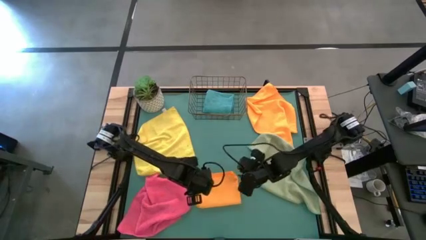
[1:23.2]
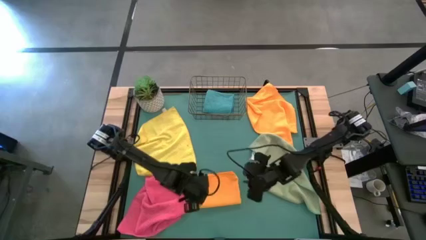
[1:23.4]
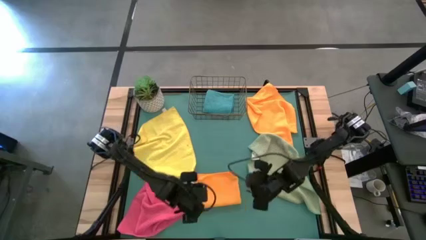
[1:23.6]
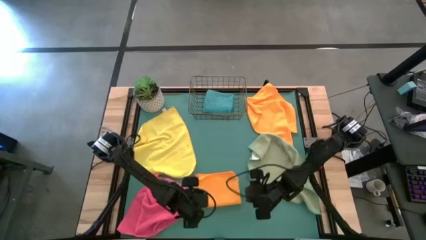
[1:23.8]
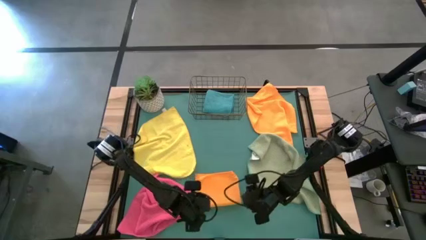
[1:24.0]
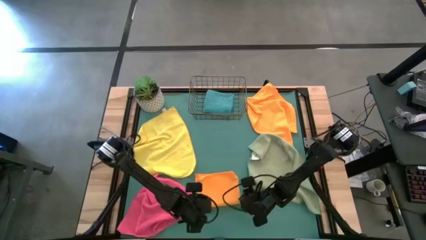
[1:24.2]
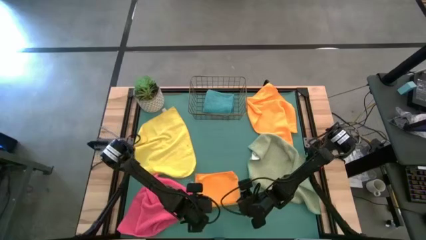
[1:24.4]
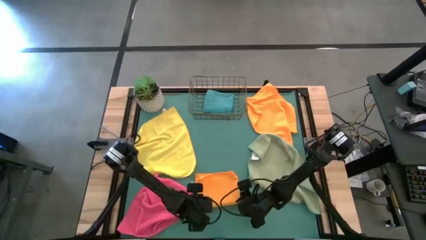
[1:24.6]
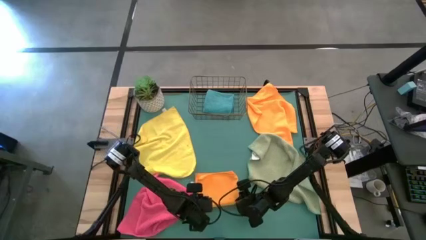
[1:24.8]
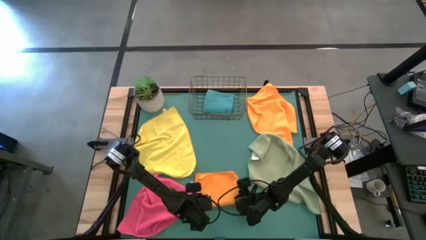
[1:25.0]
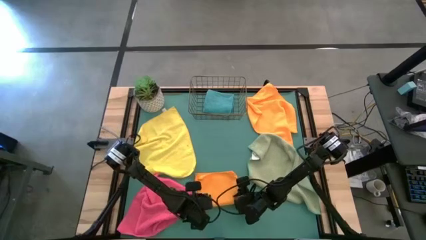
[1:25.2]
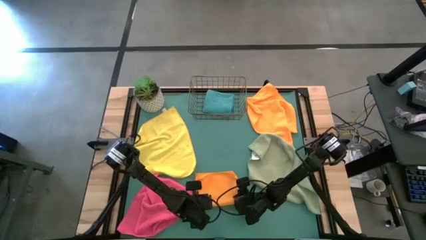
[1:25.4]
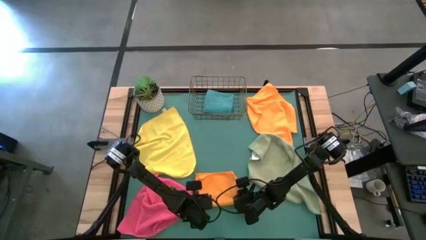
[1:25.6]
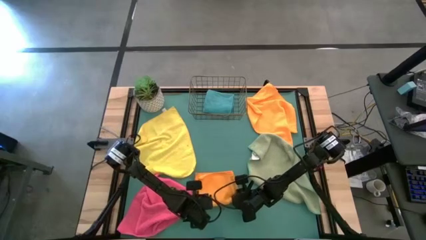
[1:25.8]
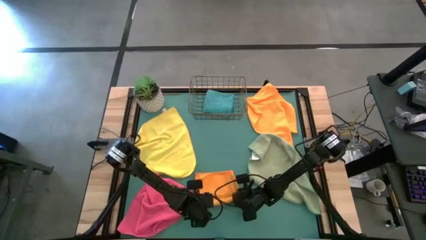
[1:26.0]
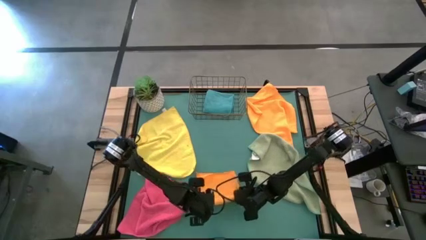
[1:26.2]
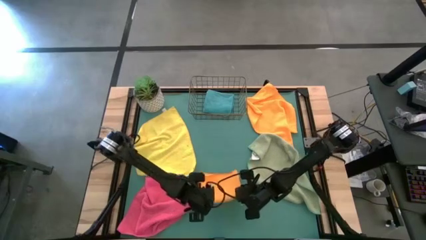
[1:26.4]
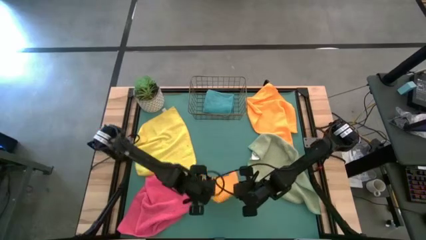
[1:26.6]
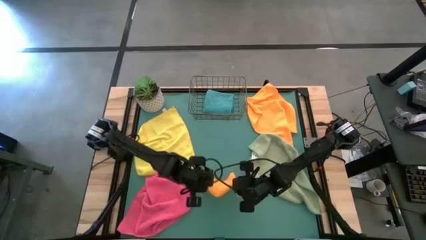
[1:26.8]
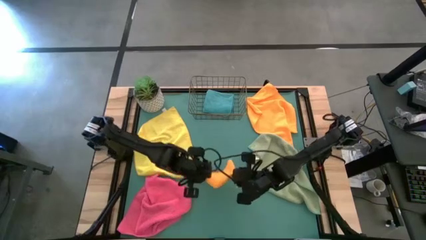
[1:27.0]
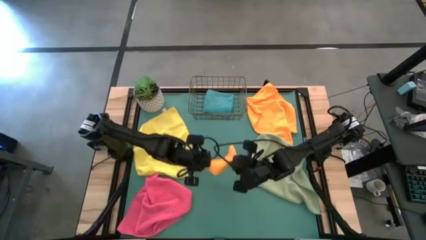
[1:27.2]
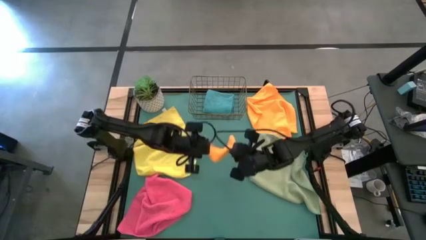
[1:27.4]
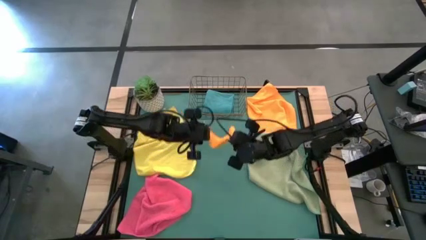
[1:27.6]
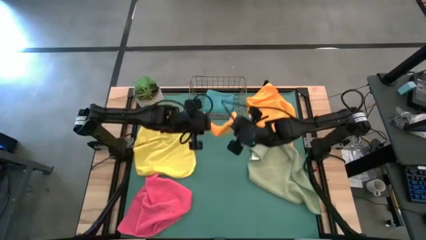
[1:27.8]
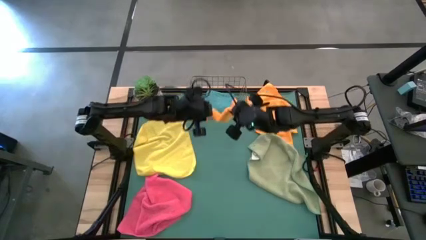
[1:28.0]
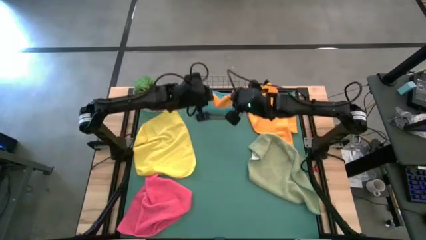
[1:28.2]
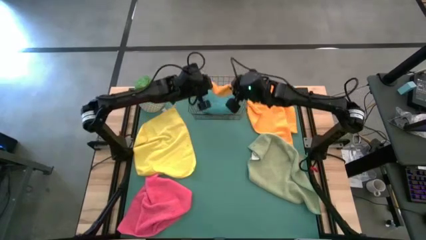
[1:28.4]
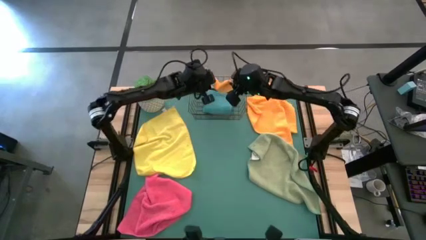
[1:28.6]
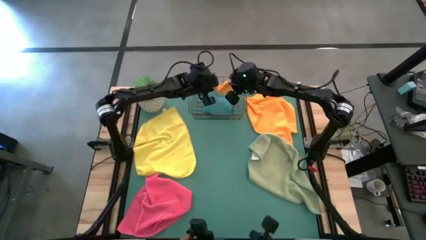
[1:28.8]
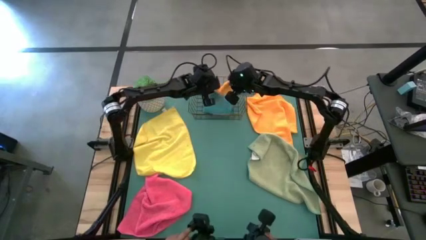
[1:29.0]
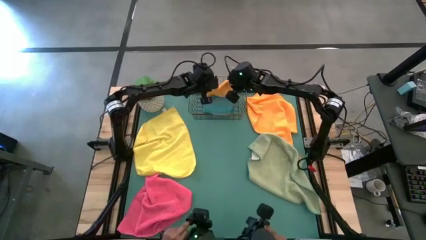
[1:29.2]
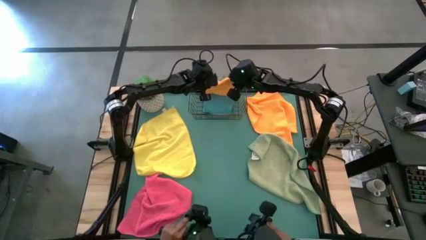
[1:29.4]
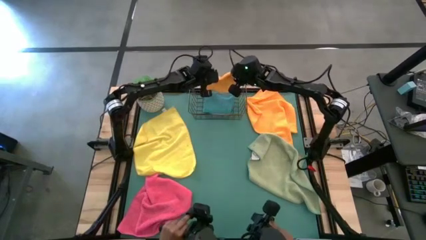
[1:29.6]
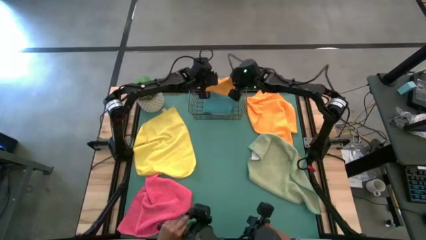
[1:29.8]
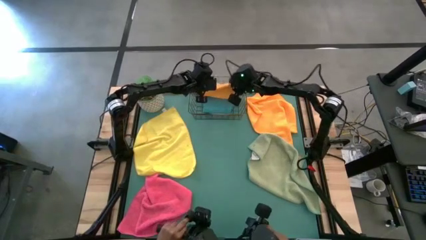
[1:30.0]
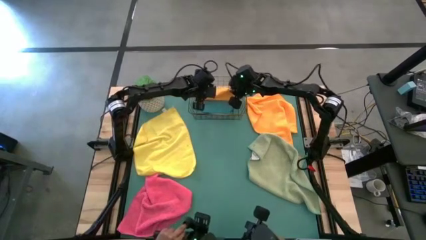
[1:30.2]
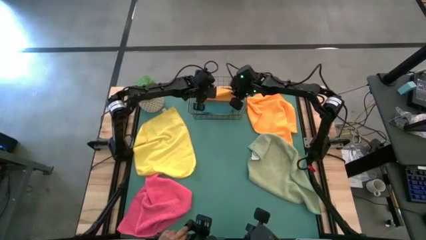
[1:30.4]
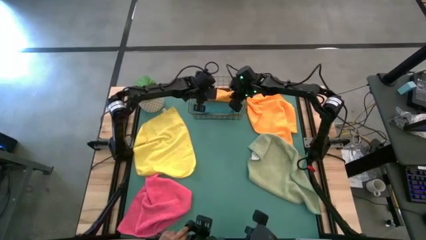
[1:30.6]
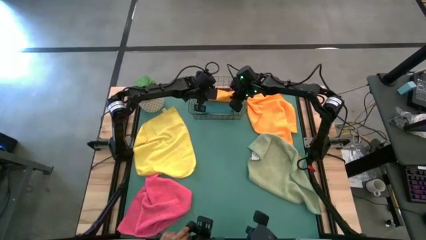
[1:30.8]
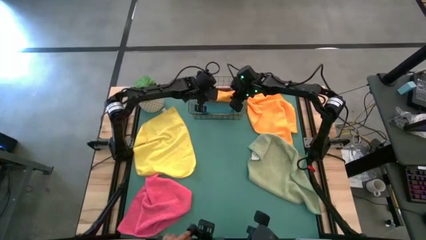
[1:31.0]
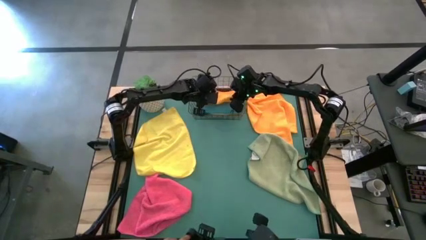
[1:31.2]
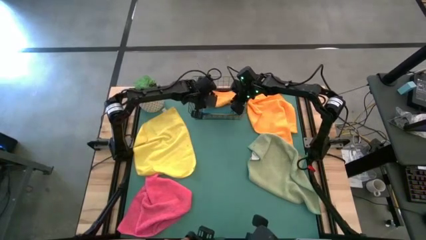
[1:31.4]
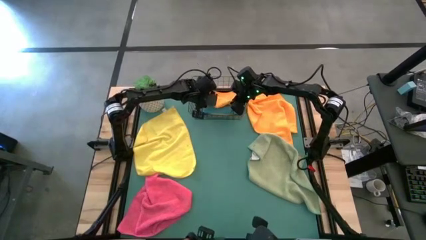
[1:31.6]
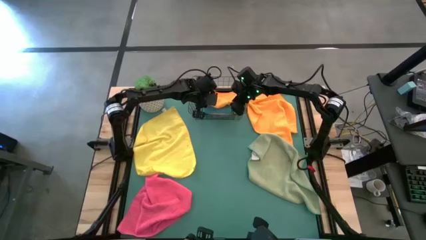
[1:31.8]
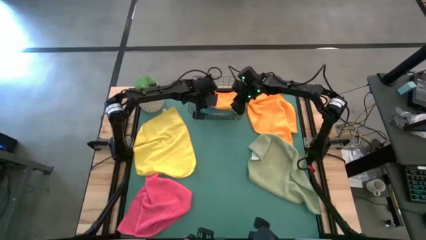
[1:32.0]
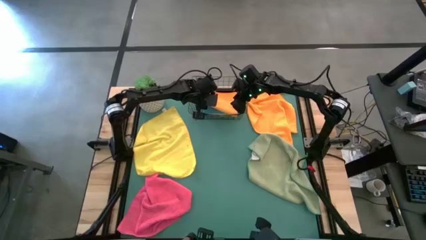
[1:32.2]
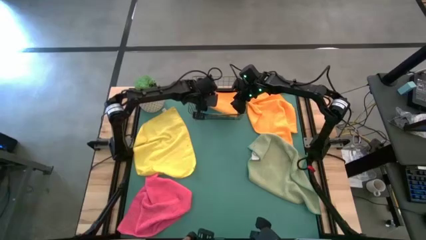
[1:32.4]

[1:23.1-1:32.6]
Task: Fold microfiber towels
Put the left orange microfiber cloth into the wire basket

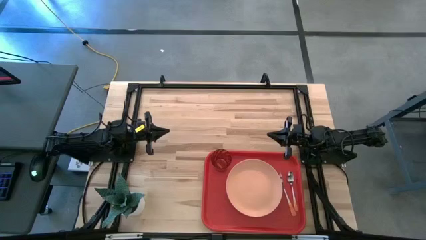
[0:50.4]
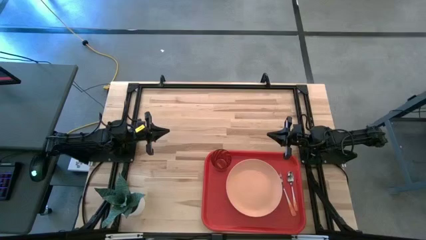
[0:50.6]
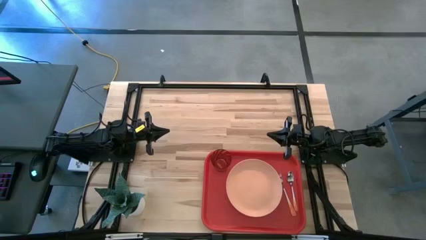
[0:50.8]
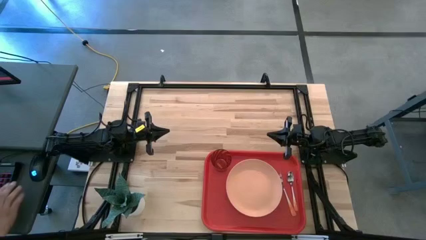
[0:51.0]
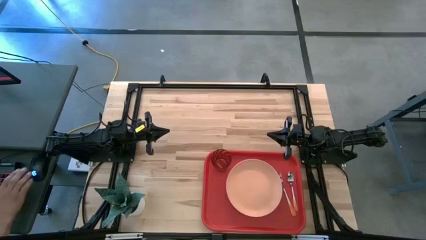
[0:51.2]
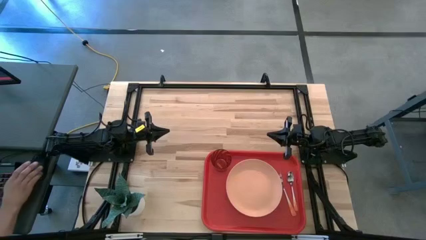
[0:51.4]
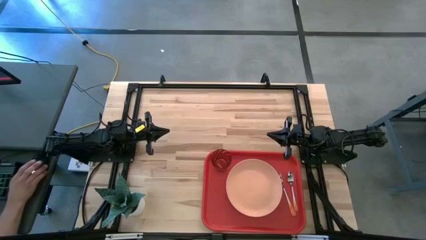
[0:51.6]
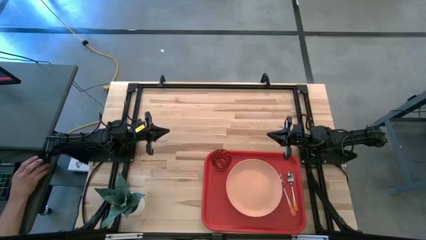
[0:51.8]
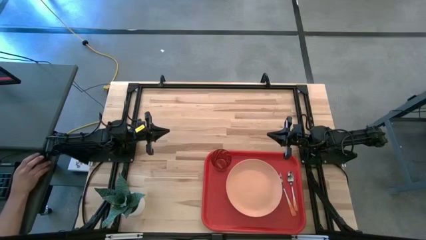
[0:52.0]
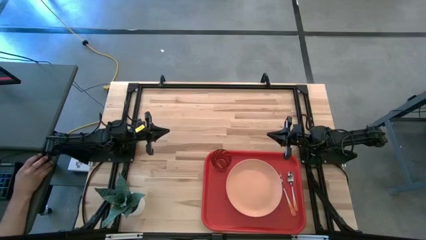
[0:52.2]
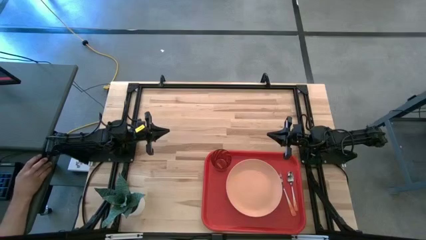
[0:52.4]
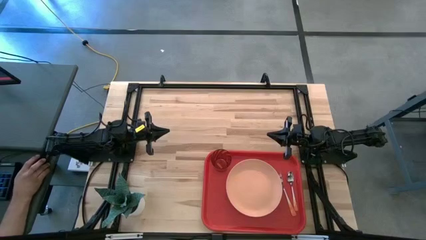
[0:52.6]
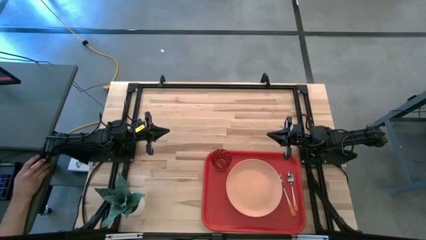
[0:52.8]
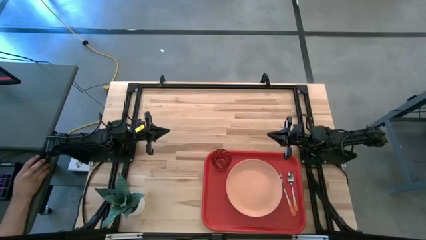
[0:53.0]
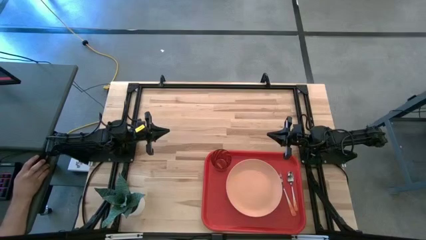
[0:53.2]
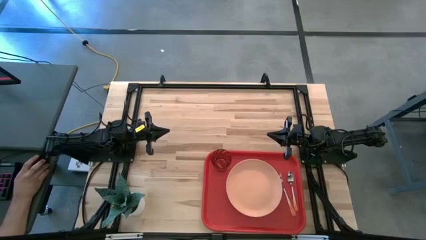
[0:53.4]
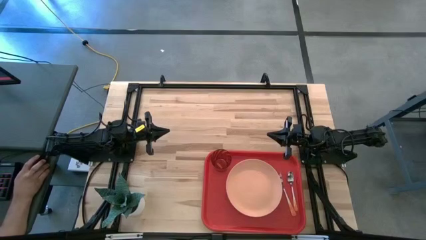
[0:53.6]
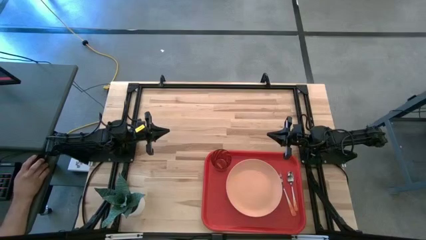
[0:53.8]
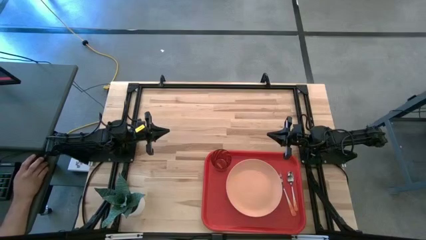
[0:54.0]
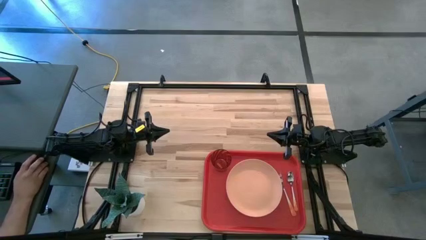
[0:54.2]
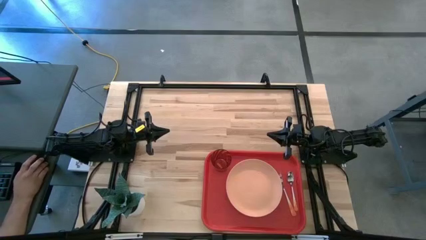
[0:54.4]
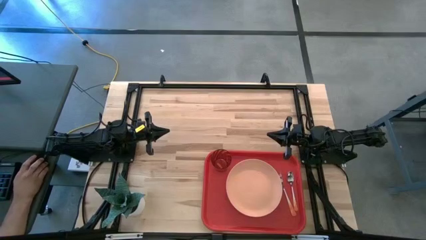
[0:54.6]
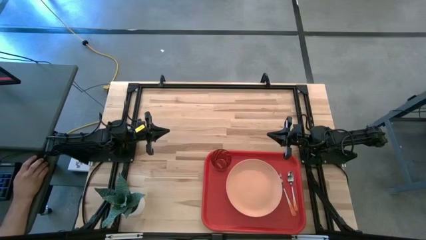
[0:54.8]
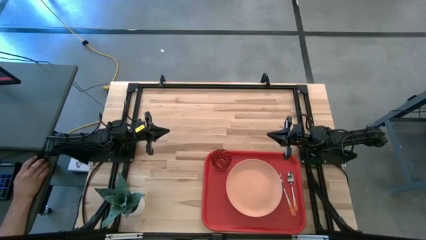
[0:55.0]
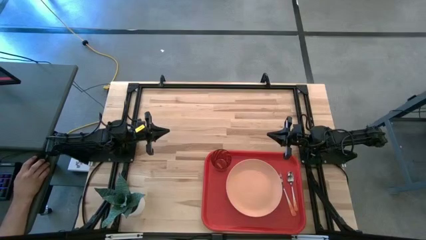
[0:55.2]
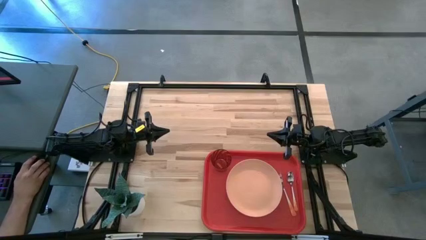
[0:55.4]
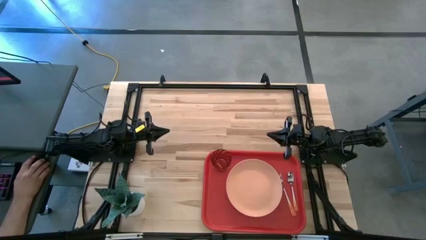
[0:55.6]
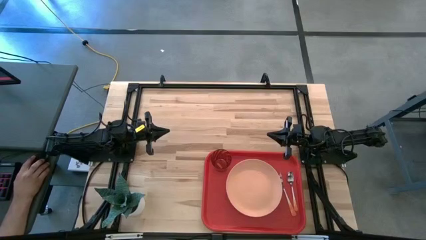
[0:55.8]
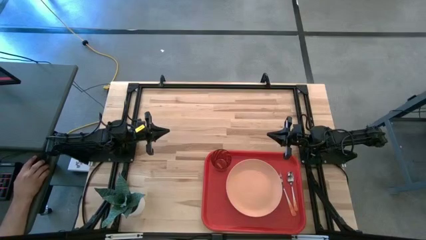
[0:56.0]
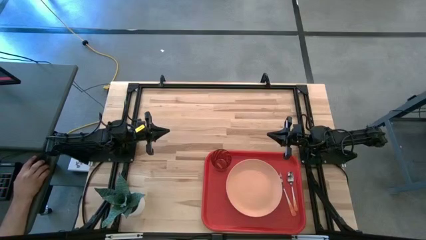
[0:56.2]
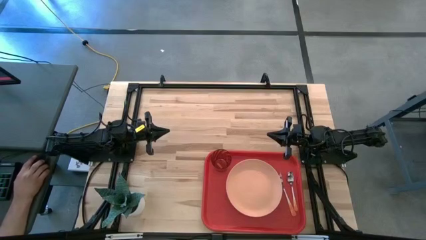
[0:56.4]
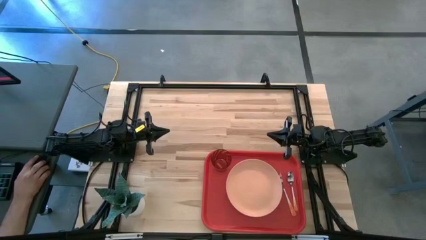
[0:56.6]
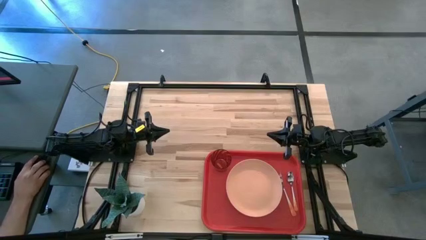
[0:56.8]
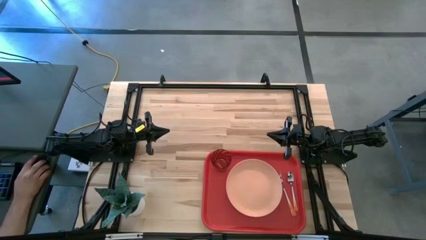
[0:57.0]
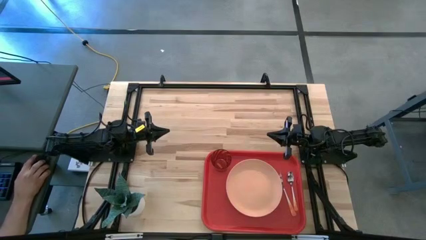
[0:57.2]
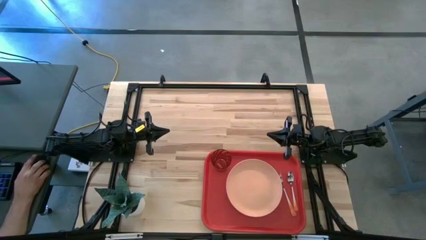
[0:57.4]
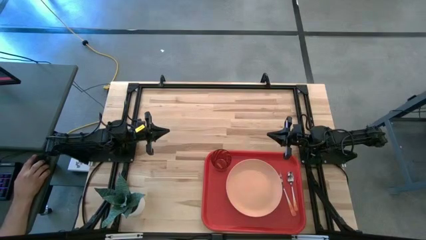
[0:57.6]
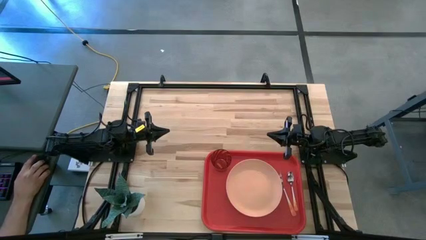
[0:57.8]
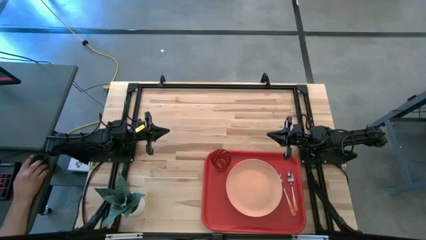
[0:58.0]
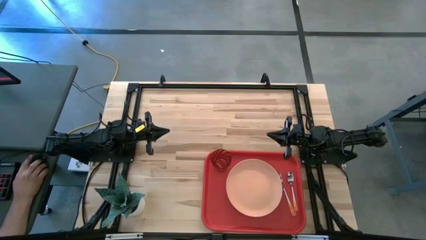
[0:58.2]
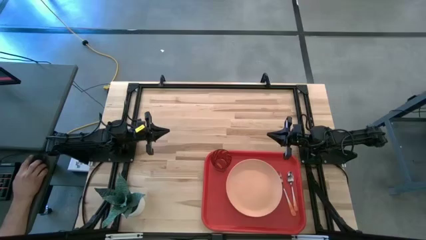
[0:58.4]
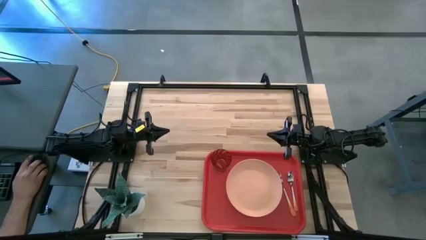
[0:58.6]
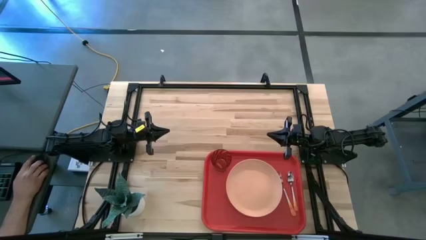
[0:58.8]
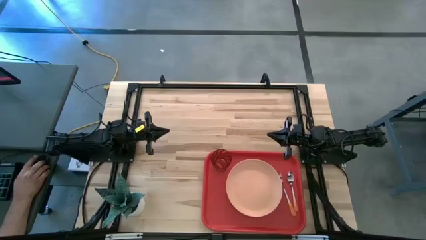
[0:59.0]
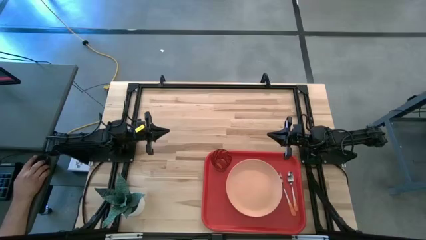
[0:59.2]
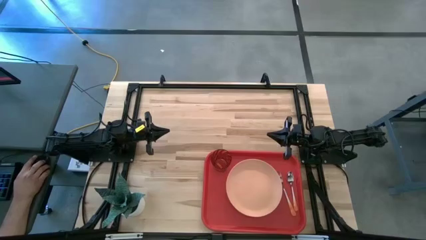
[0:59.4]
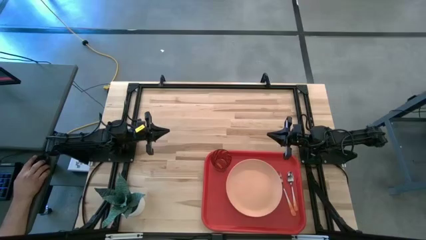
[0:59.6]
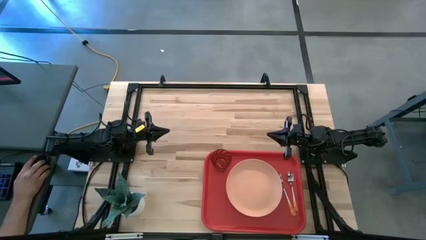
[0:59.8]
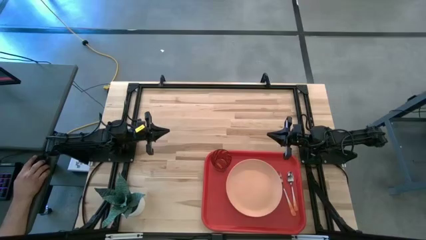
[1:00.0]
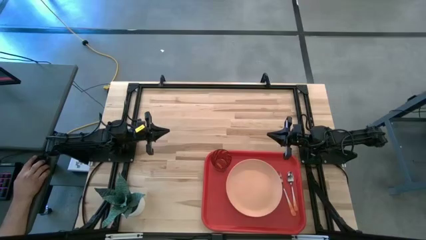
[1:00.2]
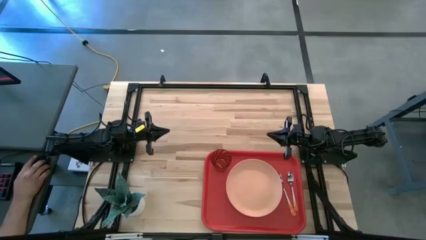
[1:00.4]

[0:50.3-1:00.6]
Task: Pick and place plate/cup/fork/spoon on tray
Return to Home Position
